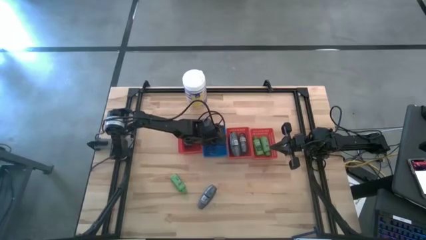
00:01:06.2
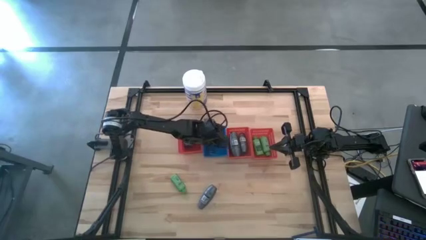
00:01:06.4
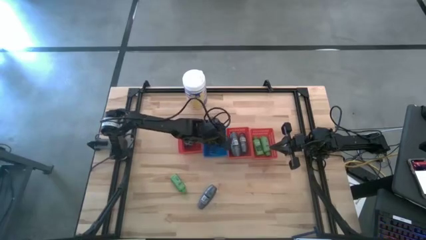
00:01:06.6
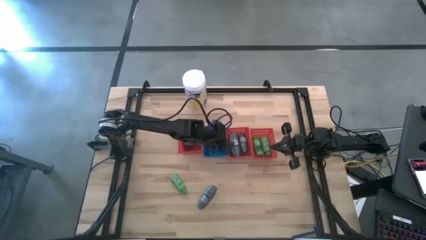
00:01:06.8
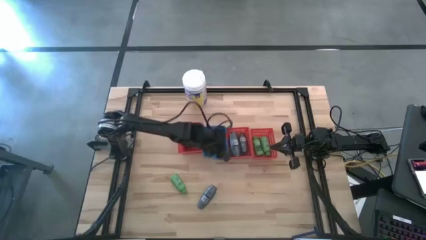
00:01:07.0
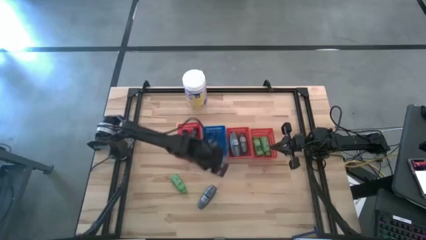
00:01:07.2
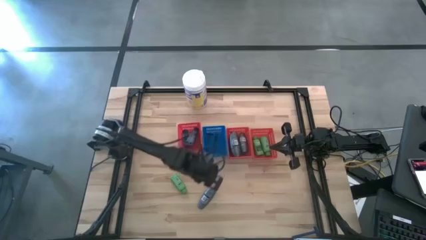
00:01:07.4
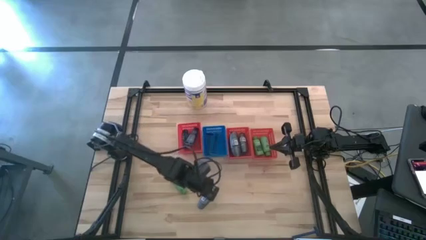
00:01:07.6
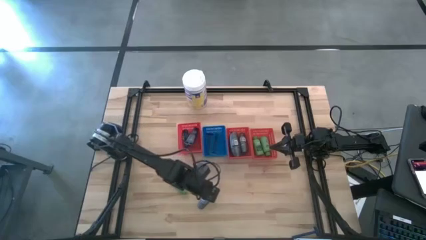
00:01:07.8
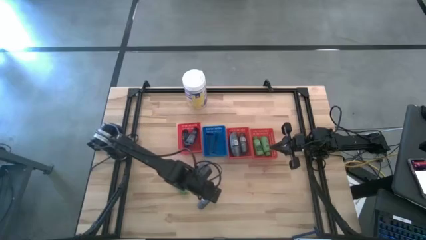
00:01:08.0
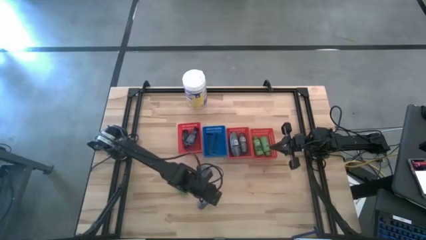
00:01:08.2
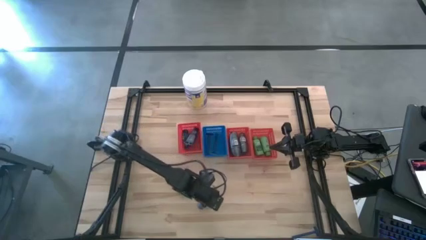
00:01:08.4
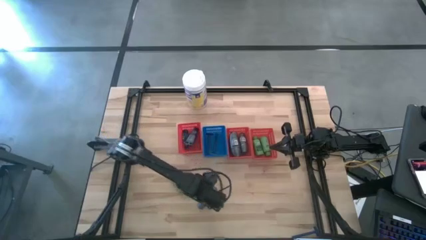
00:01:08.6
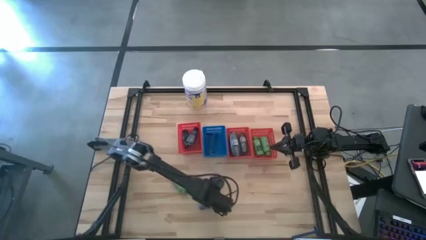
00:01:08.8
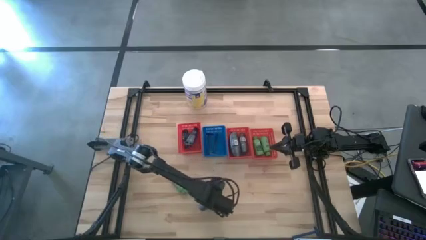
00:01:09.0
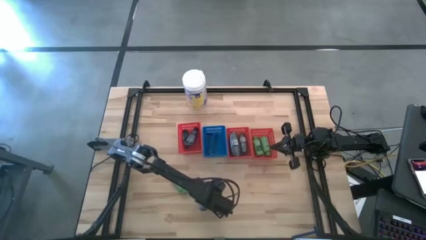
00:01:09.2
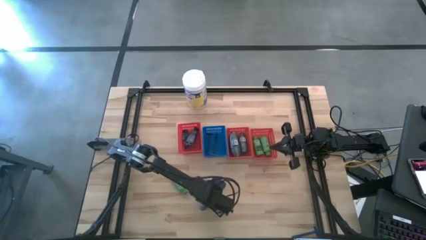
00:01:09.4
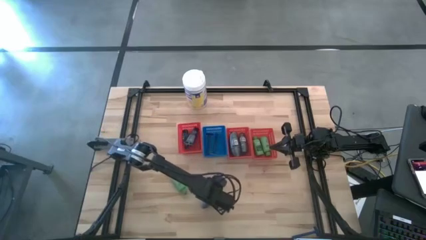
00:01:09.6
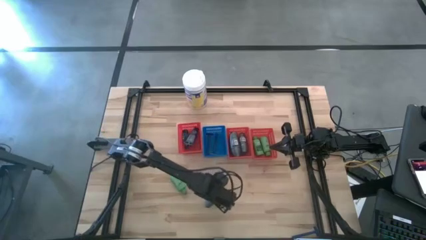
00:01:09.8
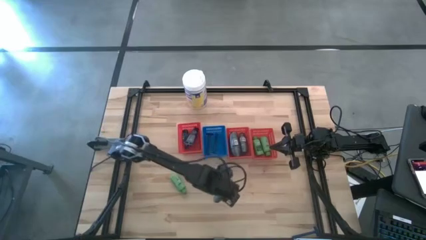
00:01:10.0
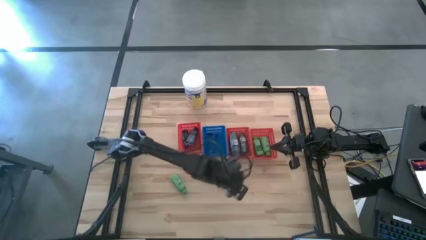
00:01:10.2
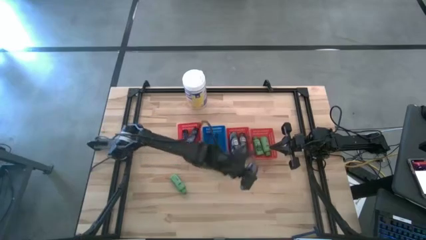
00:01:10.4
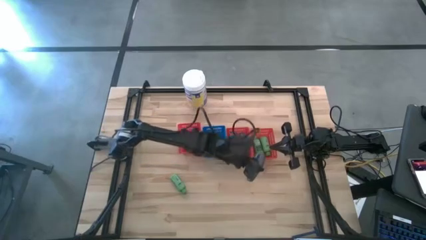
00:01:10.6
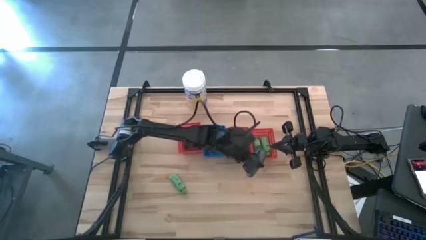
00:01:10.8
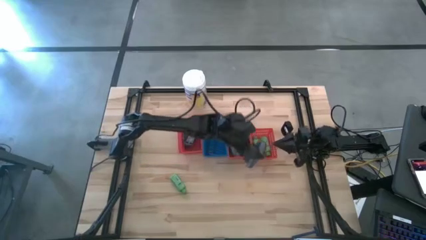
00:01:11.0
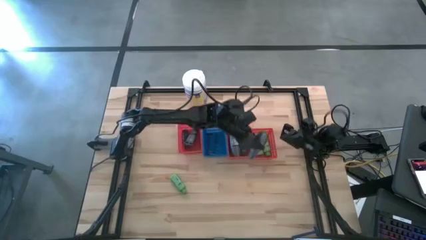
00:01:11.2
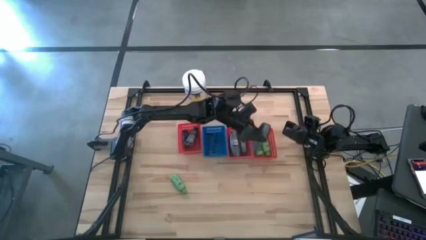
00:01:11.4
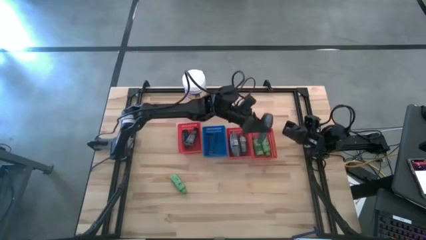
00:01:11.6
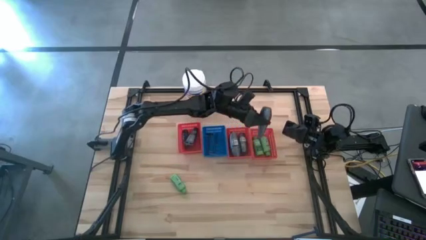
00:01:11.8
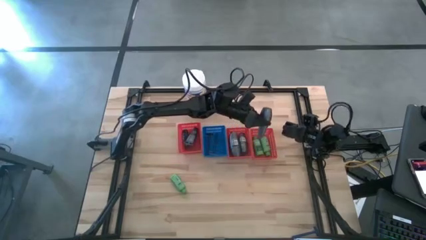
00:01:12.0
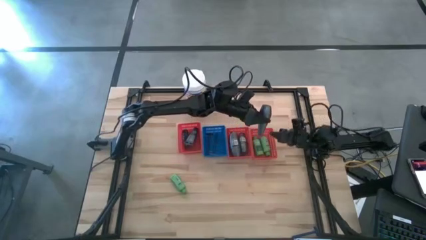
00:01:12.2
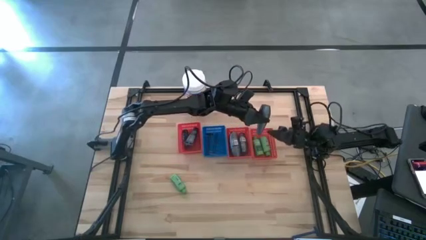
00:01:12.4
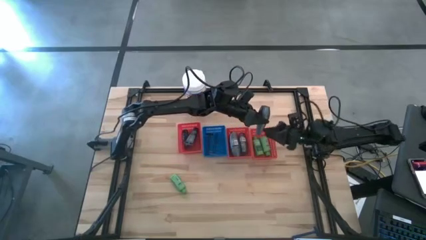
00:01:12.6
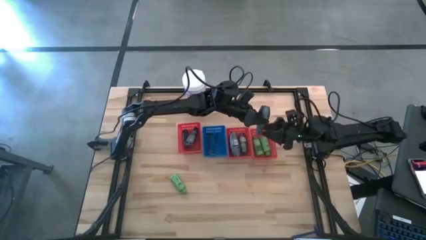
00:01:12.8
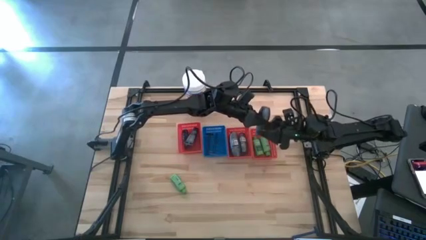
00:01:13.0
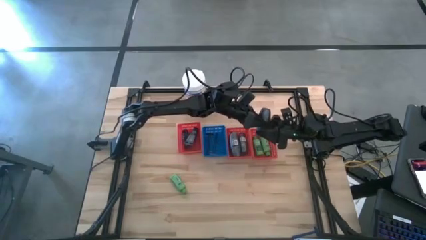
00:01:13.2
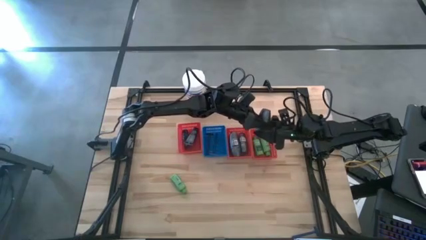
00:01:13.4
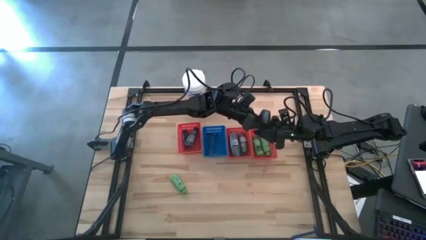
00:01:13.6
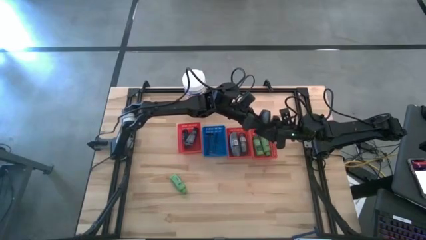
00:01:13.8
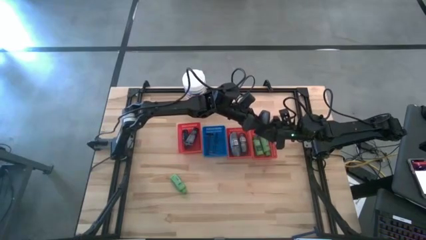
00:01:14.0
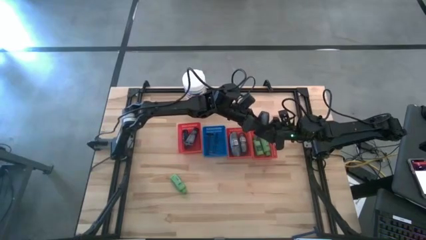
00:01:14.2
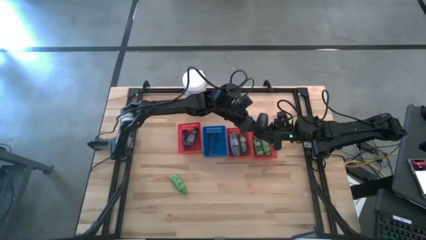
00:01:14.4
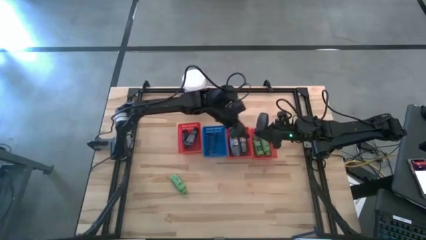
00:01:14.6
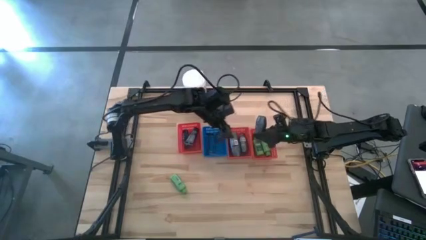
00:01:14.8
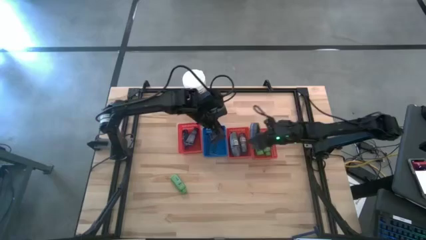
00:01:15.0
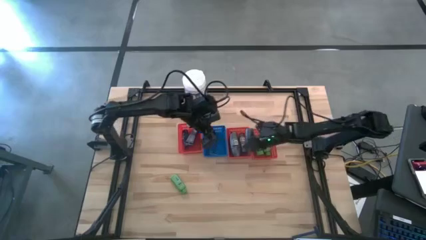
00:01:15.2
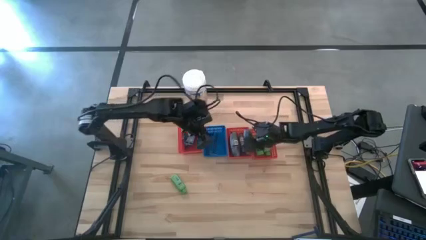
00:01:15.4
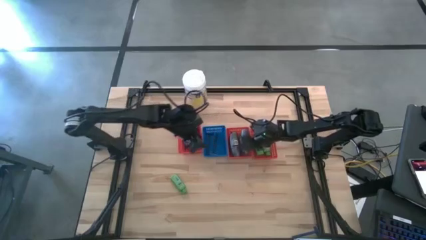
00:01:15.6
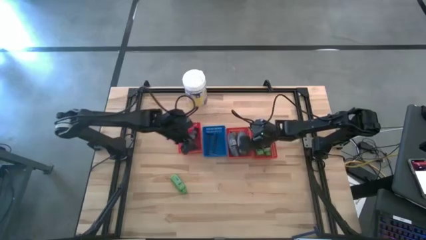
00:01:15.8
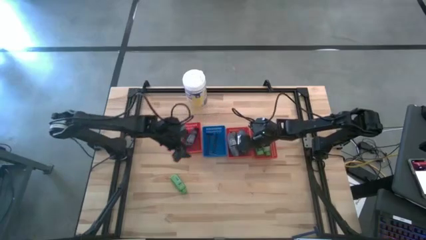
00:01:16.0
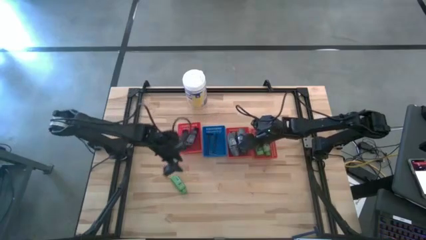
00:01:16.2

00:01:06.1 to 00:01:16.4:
Task: Pick & Place Travel size toiletries
Put the gray deodorant into the middle red bin

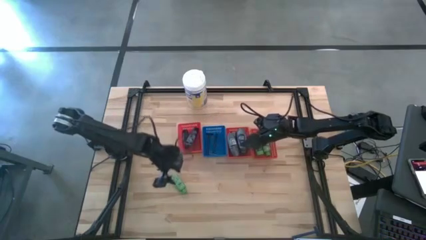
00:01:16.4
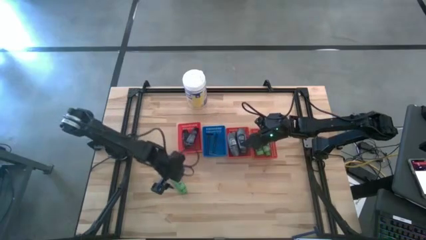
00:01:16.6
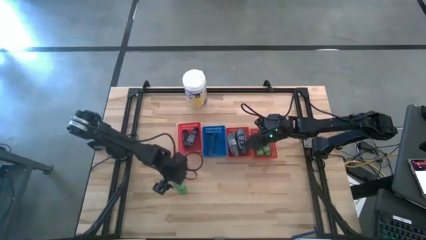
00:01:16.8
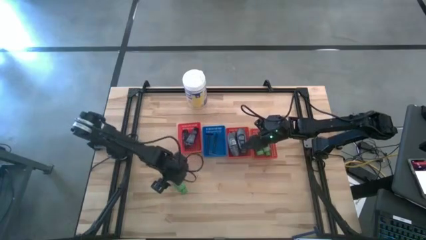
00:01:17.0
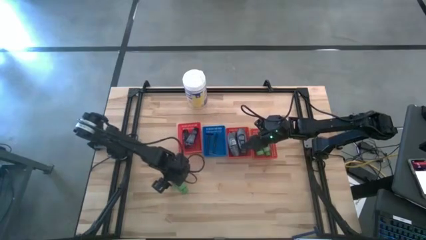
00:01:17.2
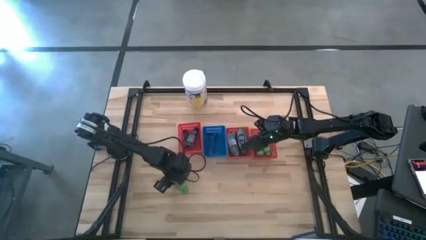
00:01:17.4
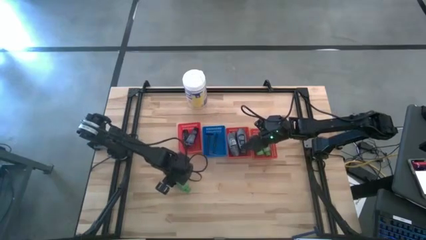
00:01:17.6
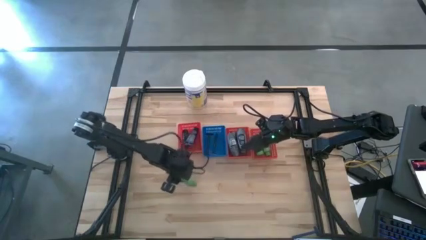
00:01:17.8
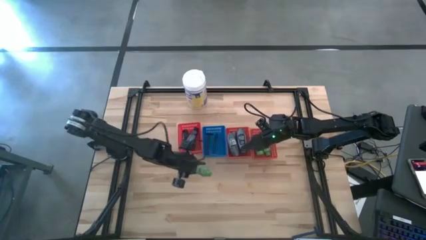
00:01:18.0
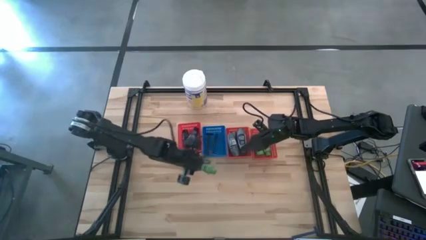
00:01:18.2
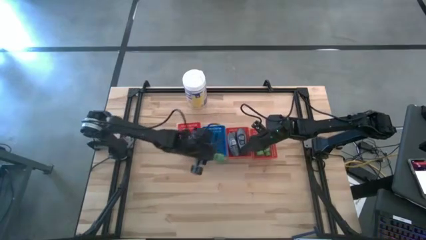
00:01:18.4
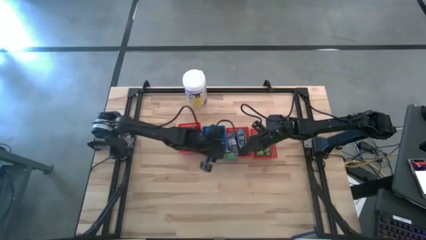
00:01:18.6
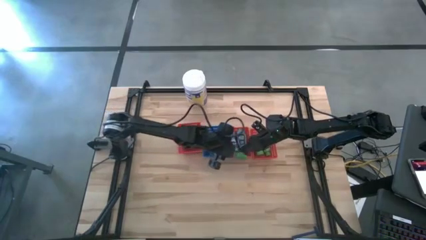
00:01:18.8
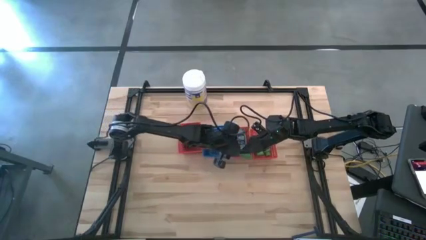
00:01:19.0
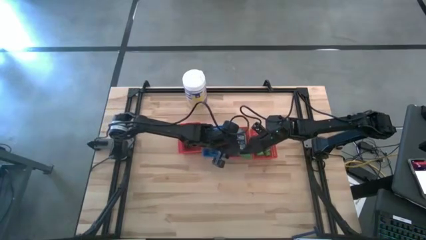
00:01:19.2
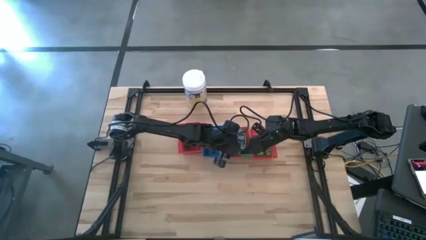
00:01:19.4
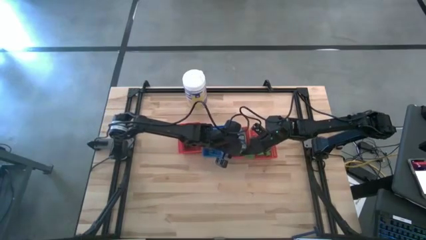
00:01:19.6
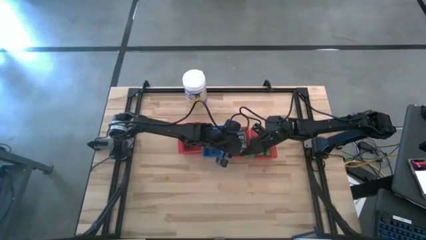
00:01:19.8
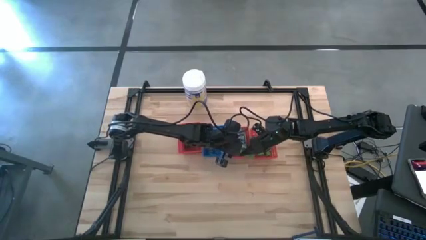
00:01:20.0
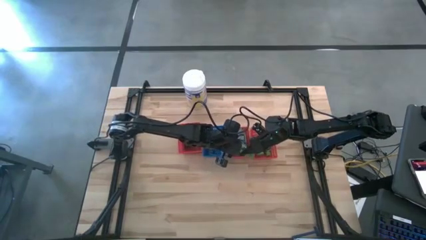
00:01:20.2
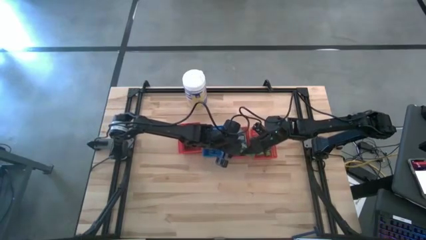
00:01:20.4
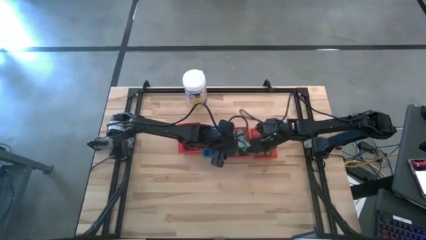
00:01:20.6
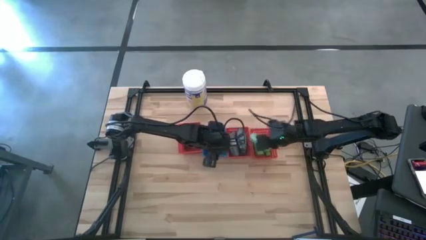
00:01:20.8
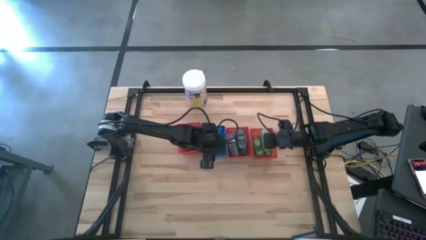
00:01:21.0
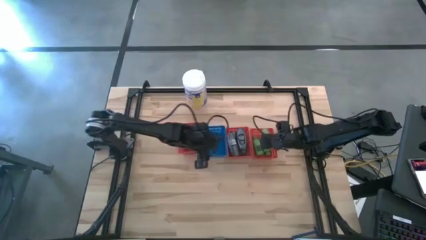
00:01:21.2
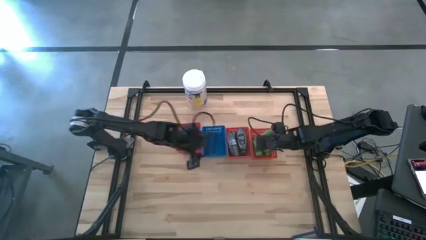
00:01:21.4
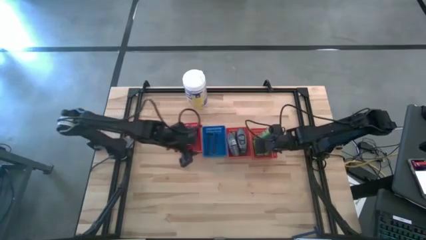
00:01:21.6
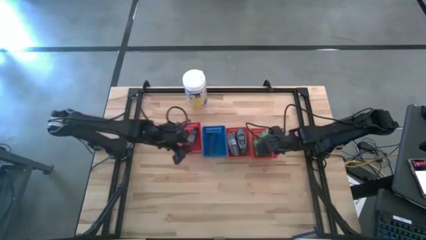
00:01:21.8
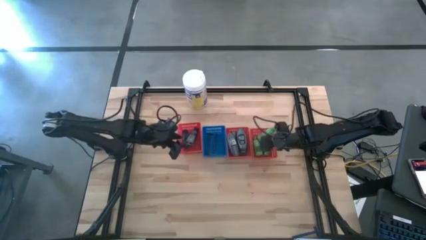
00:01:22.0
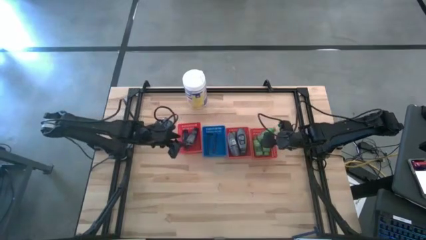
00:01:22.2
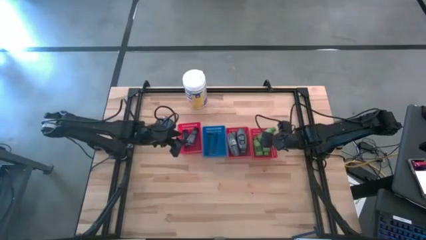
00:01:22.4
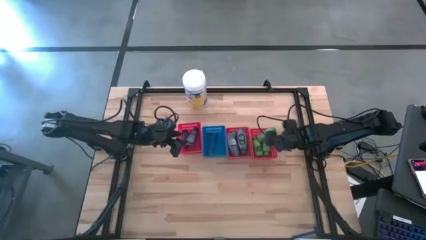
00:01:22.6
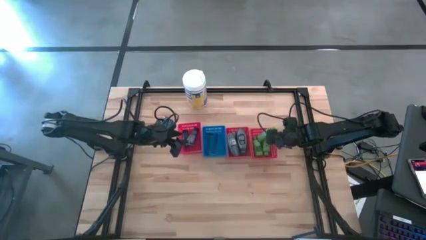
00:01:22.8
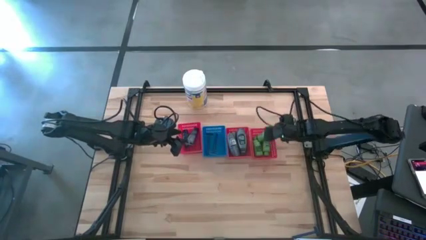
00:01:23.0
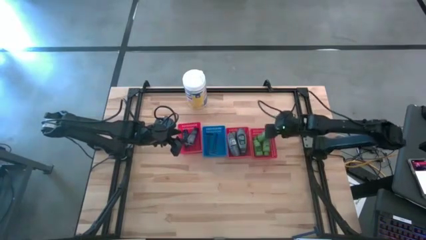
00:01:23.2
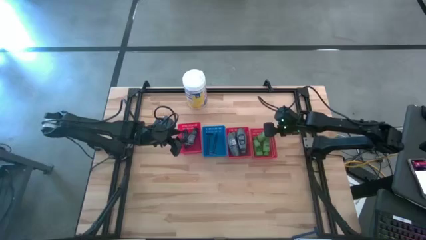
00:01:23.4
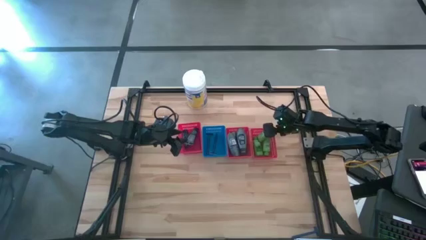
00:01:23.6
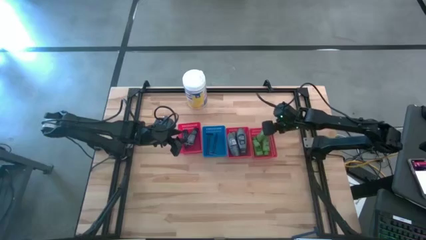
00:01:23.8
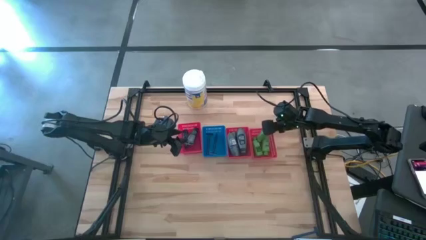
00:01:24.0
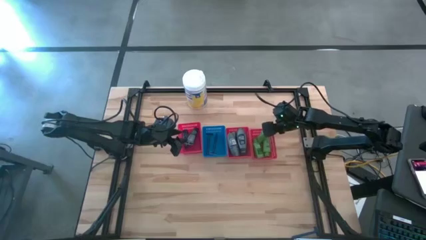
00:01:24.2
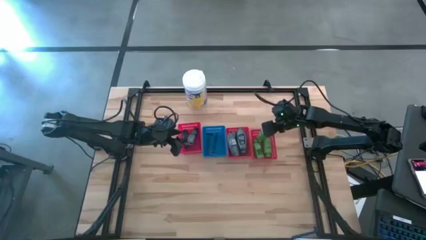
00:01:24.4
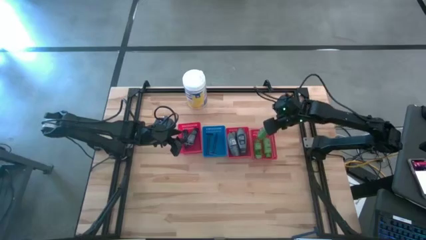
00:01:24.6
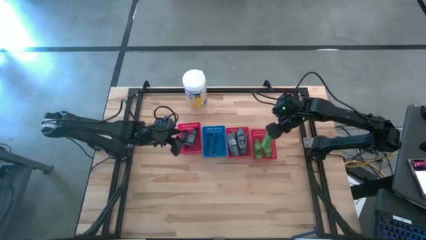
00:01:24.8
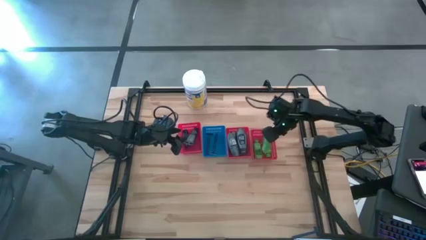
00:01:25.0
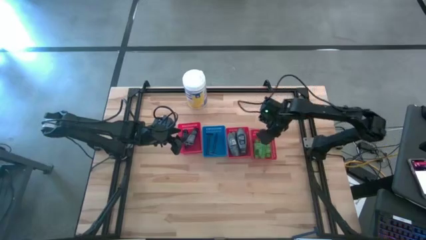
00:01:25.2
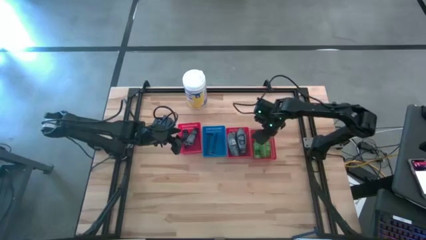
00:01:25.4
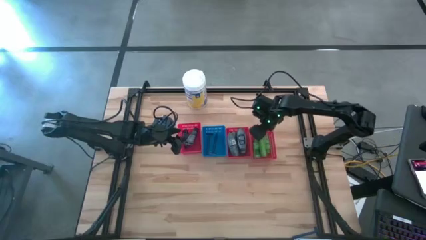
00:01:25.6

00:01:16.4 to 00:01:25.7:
Put the green shampoo into the right red bin
